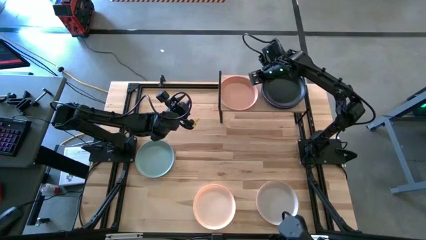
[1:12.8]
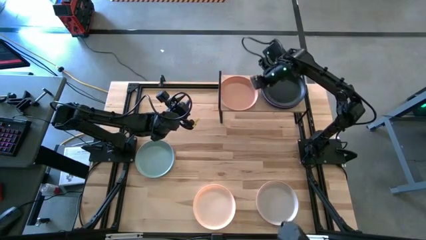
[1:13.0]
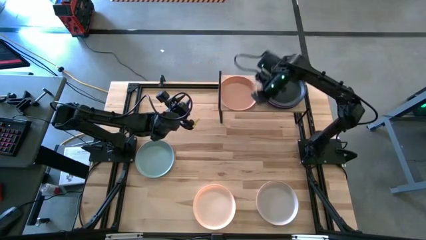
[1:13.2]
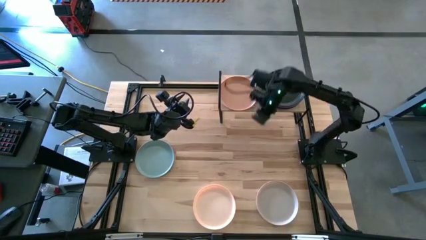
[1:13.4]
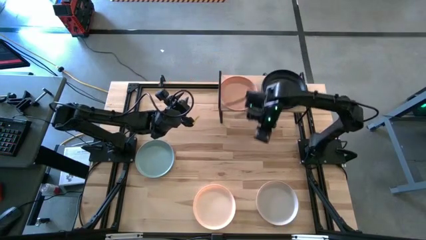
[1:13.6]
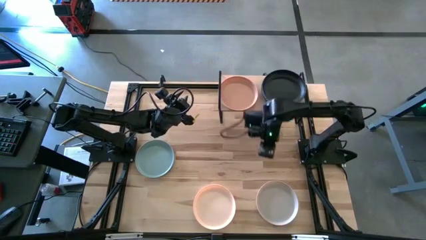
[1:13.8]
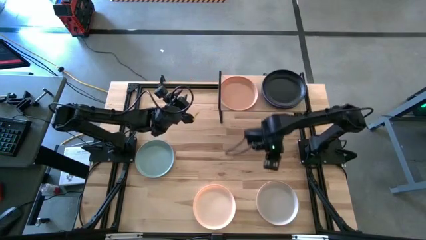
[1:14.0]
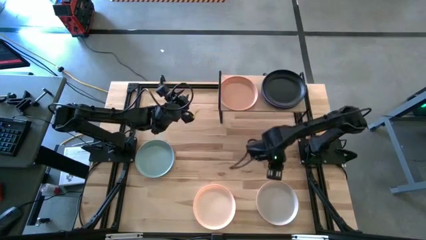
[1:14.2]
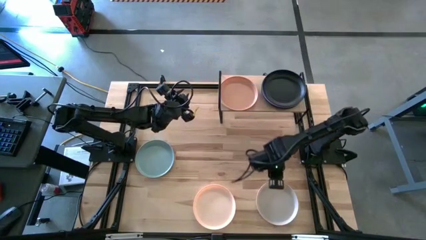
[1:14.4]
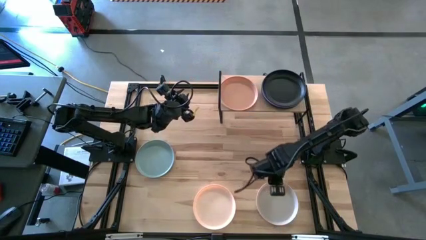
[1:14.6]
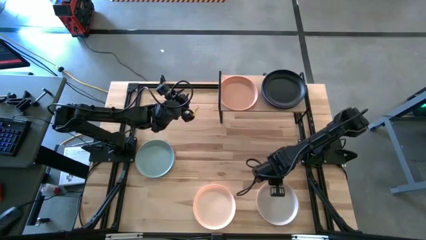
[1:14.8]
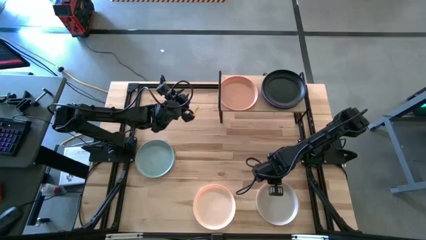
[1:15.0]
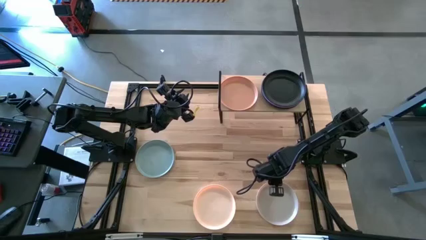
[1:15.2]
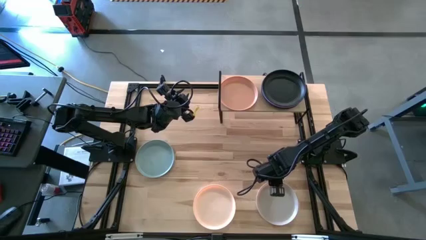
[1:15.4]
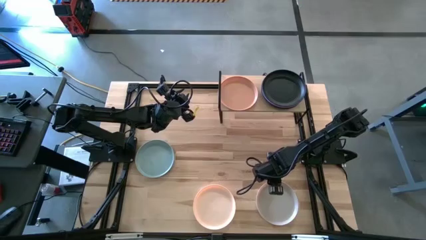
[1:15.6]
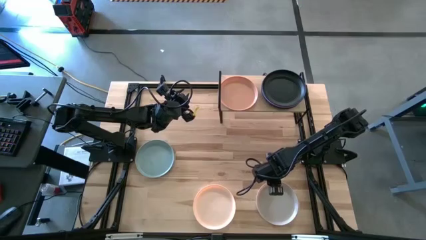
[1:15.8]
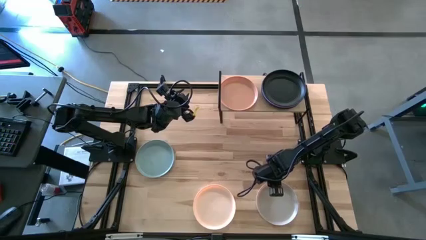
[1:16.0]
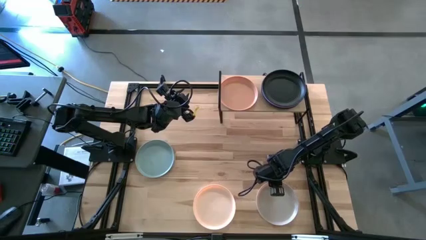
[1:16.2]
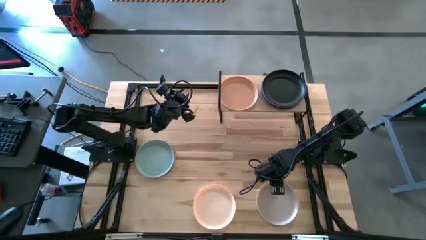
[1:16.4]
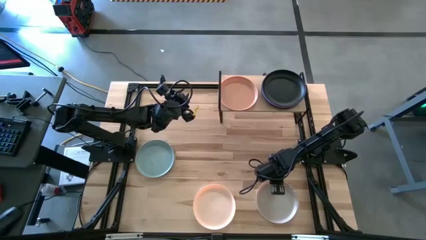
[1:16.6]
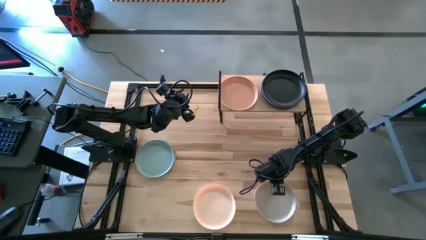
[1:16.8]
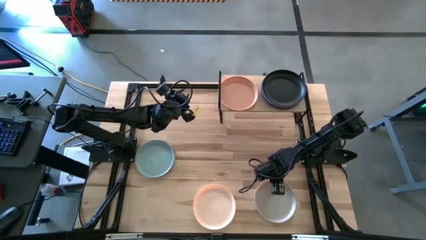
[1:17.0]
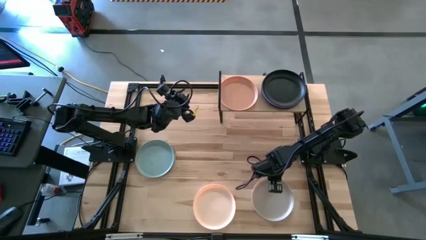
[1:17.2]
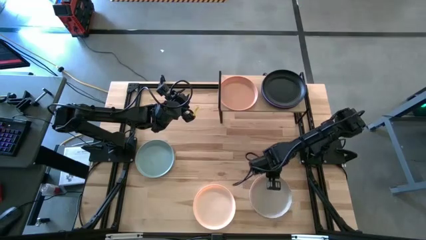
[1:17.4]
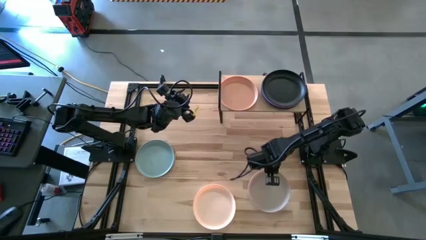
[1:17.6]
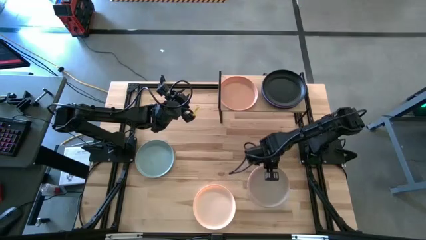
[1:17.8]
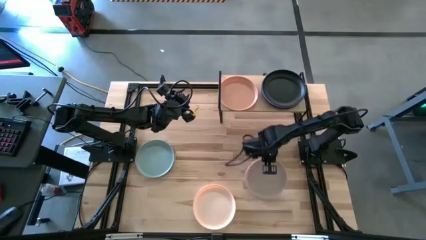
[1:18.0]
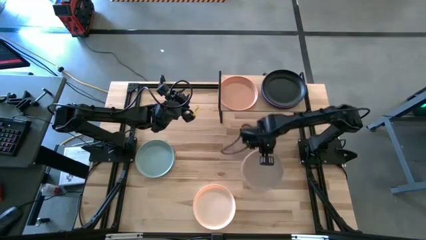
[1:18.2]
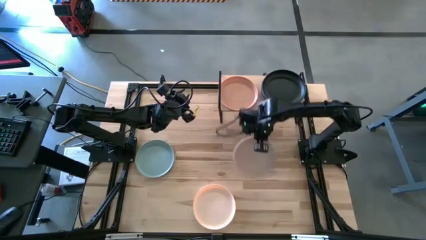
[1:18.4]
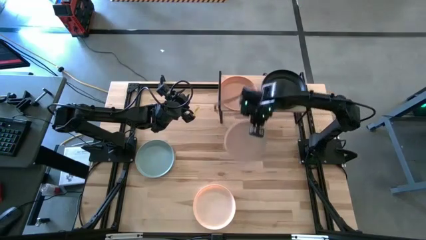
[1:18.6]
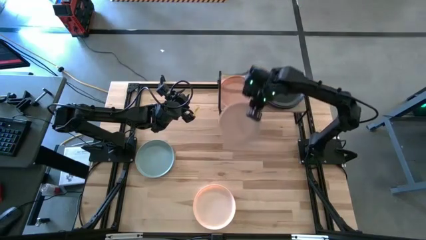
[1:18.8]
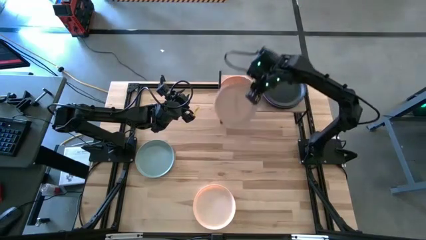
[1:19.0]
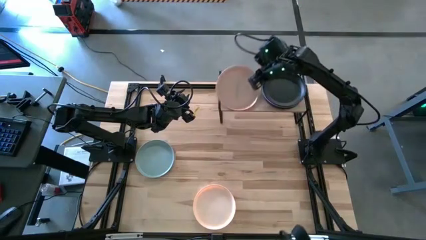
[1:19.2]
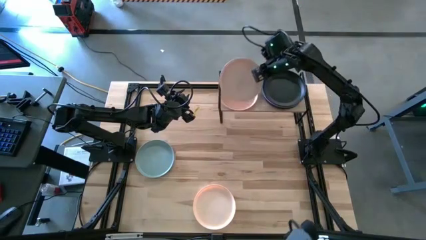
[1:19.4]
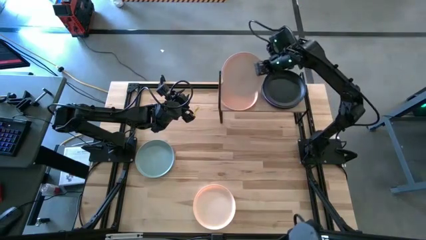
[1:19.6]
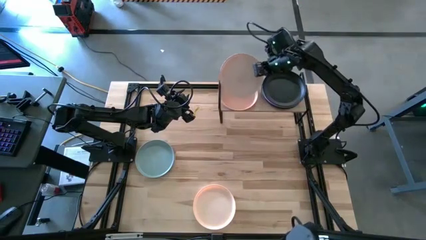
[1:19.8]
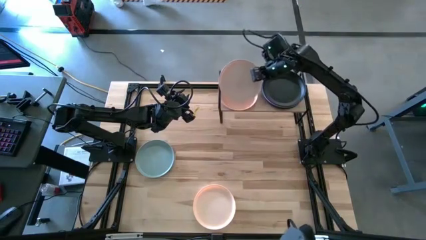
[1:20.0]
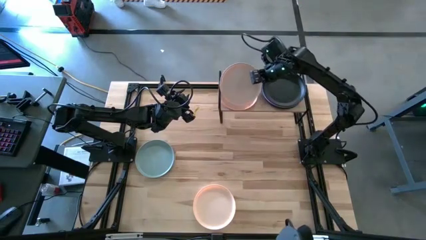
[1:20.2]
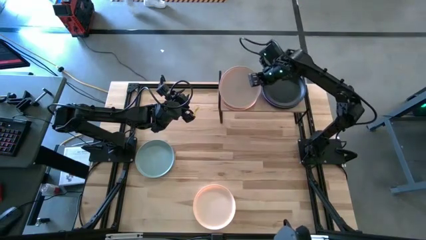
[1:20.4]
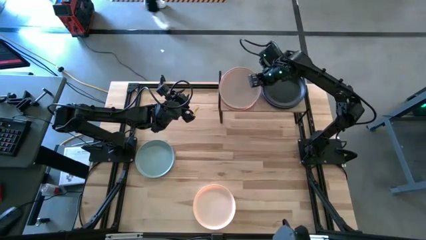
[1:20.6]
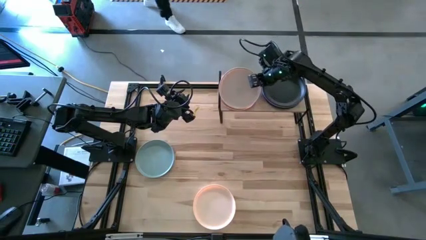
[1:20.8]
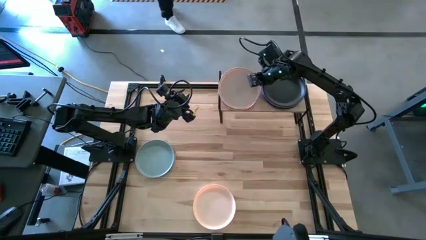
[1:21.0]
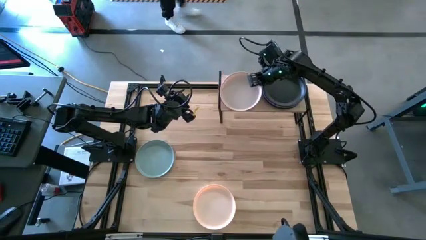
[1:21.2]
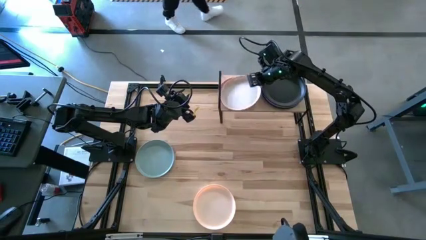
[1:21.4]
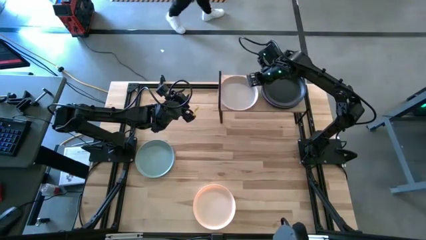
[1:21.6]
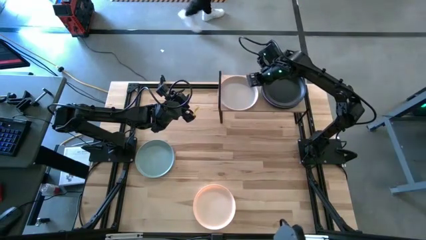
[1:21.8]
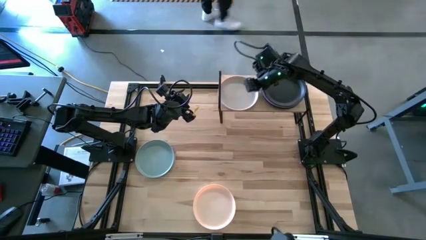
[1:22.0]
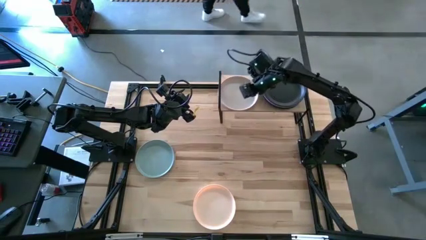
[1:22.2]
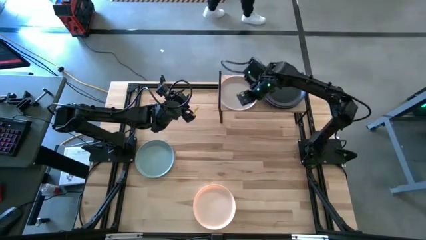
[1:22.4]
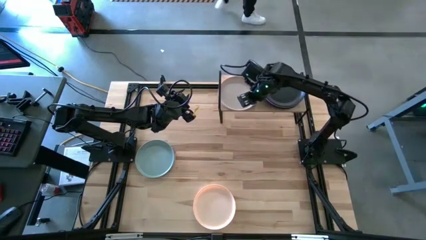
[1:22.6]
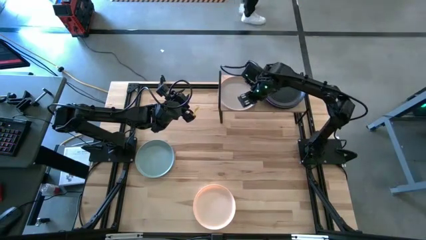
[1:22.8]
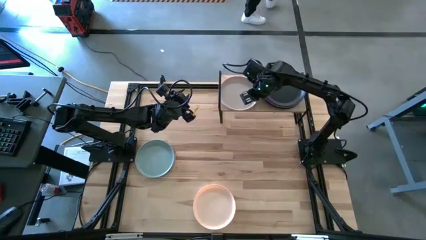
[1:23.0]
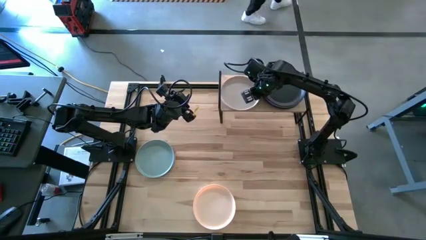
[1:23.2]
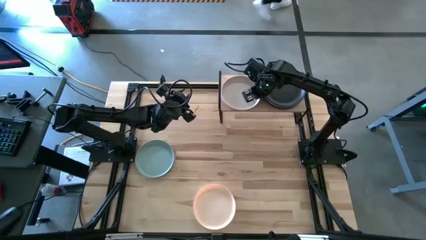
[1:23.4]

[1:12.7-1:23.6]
Task: Place and stack plates onto a shelf
Stack the white plate on top of the orange plate on the shelf

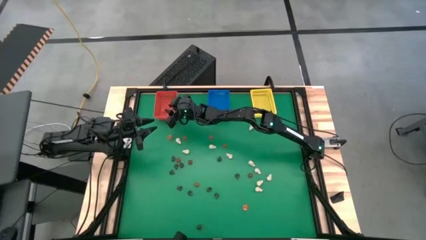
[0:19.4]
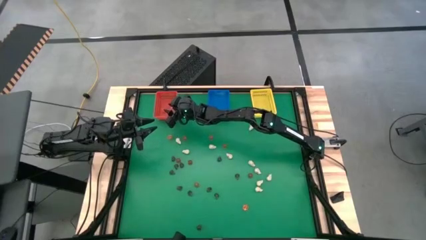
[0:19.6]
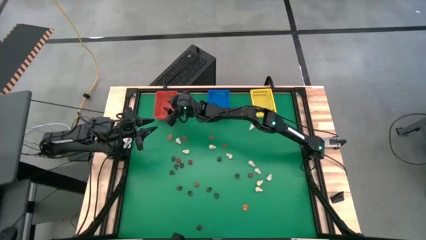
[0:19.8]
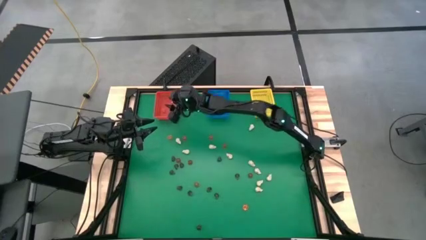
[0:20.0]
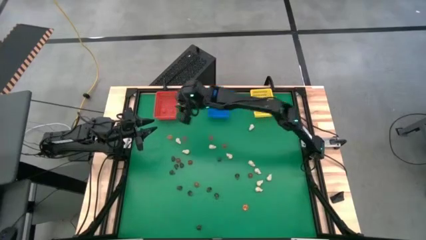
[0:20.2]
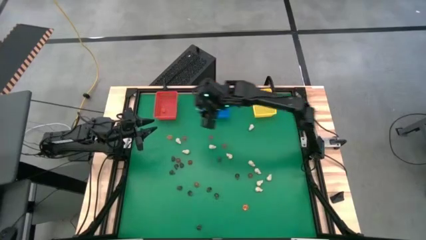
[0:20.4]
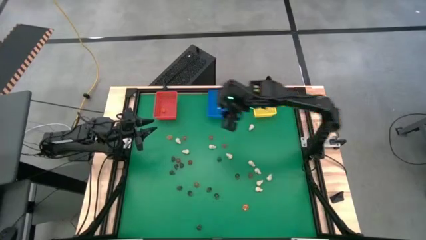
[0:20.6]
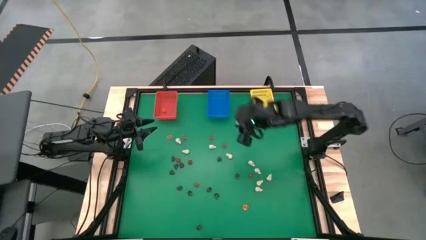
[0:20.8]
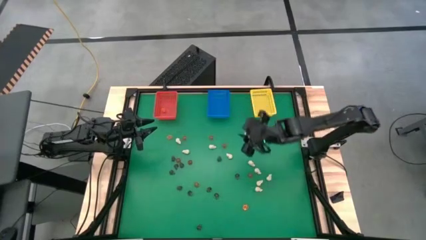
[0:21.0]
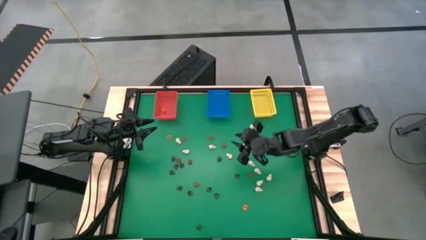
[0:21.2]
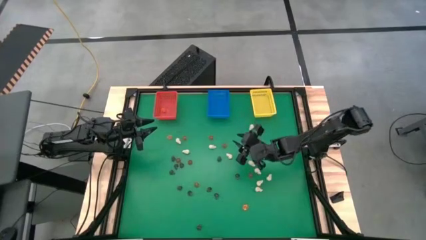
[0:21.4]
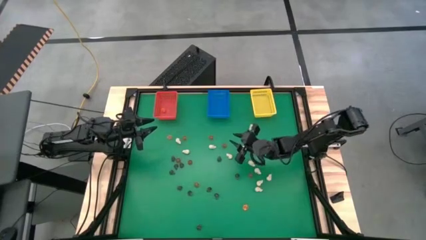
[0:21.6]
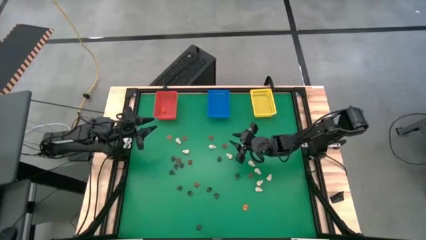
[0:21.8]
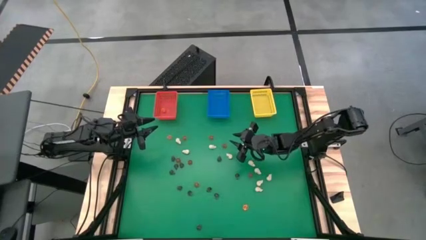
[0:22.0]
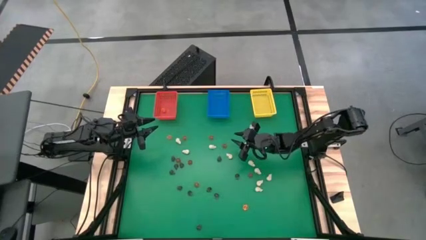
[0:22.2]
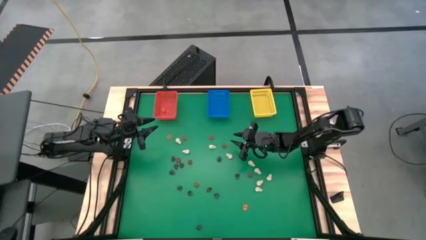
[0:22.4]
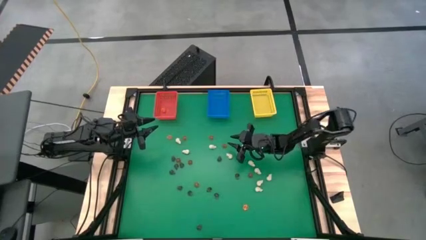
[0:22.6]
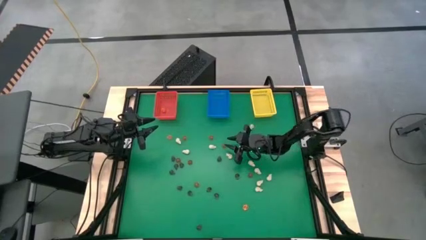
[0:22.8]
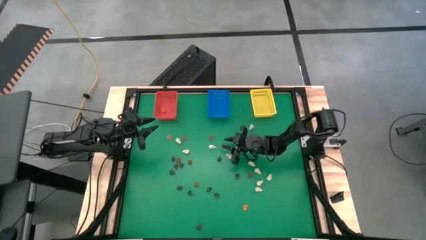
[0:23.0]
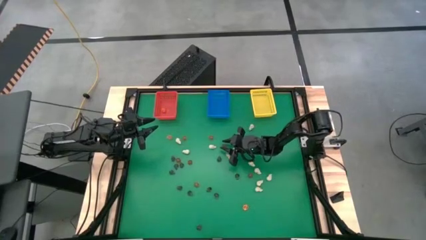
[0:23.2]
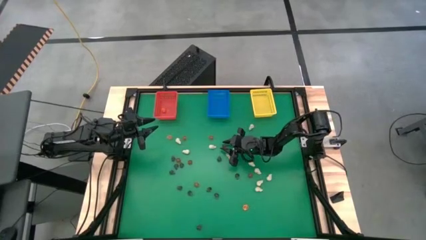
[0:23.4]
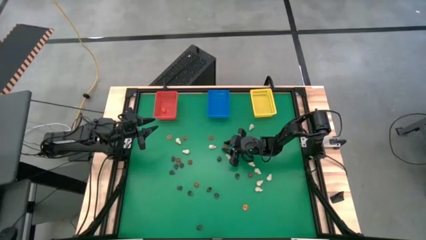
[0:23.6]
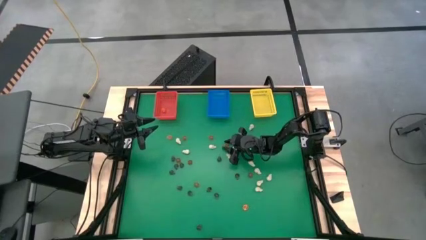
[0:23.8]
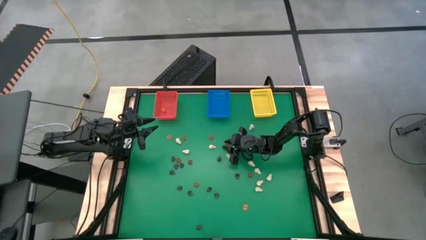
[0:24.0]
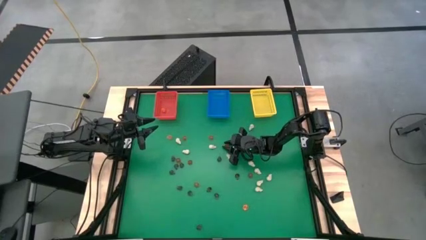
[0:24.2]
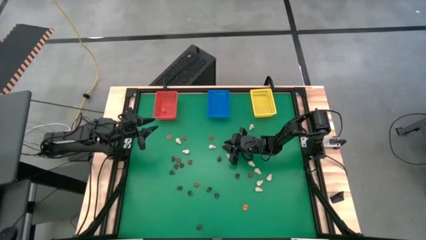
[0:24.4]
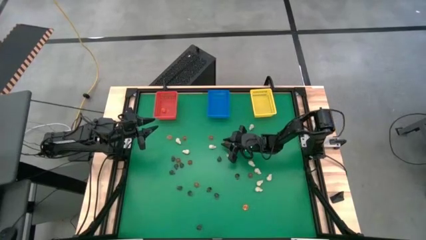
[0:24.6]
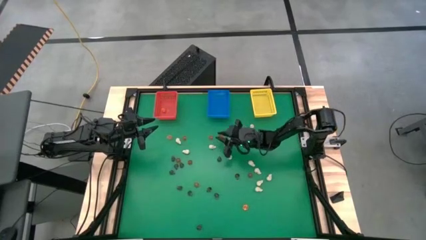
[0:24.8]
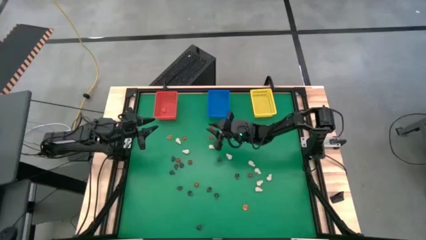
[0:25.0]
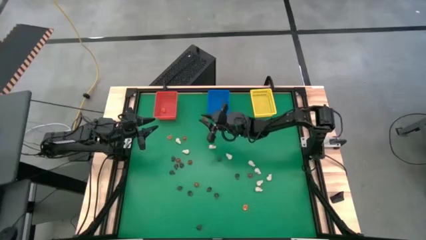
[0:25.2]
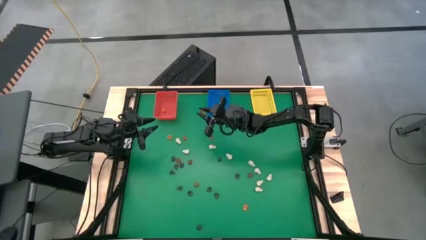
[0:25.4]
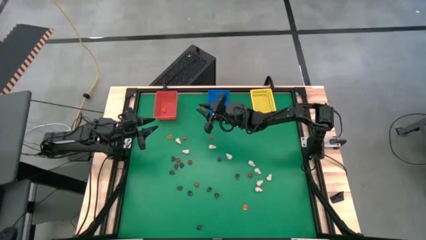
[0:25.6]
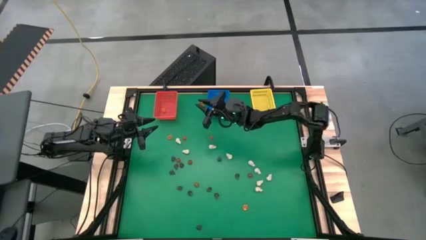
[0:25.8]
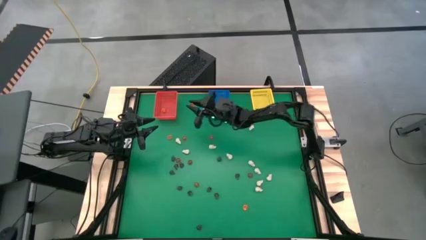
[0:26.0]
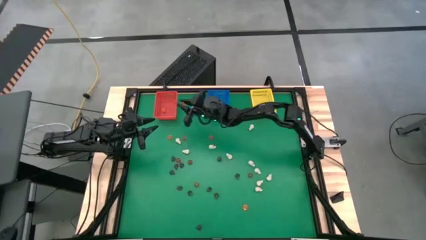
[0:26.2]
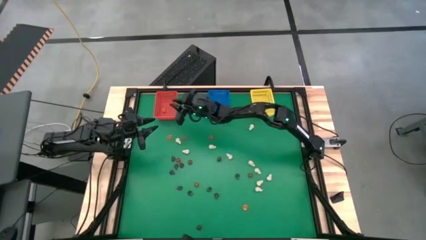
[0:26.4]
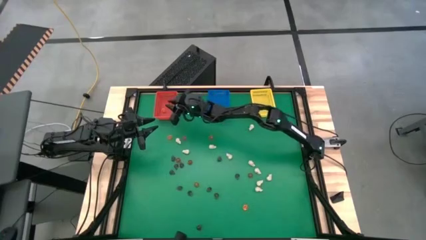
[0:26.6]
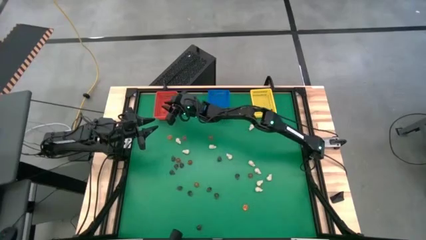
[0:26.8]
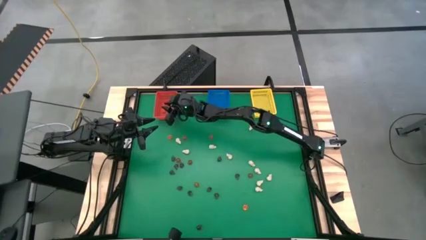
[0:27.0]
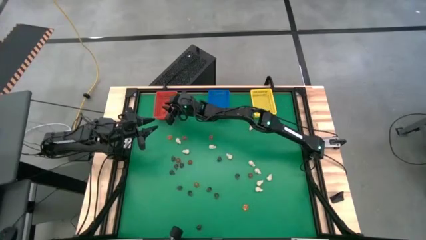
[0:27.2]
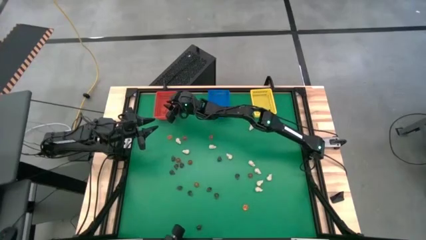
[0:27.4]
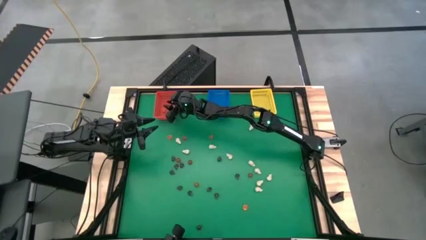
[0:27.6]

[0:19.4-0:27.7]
Task: Sort Halloween decoration
Put the orange pumpkin toy into the red bin
